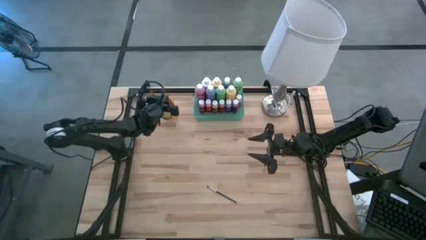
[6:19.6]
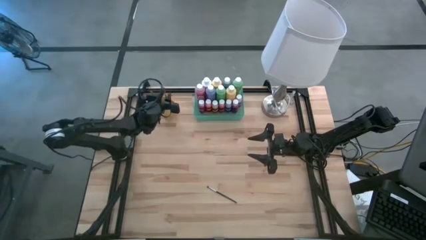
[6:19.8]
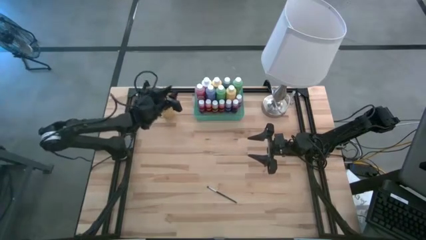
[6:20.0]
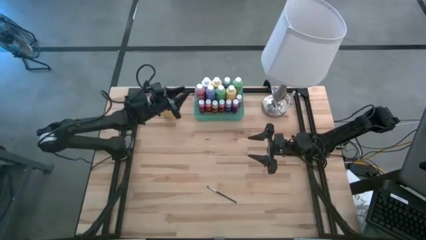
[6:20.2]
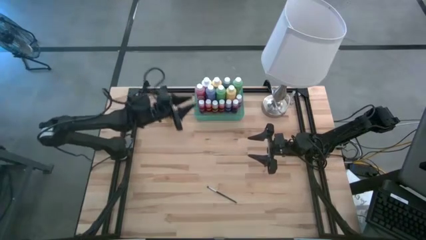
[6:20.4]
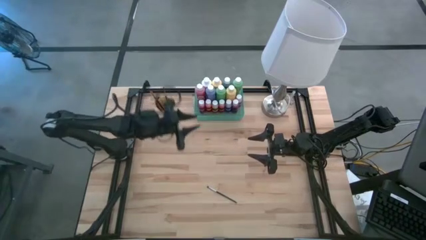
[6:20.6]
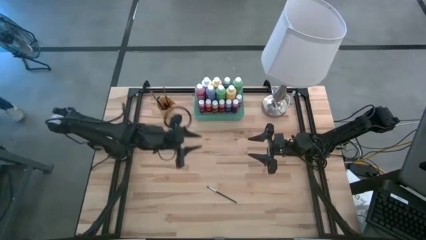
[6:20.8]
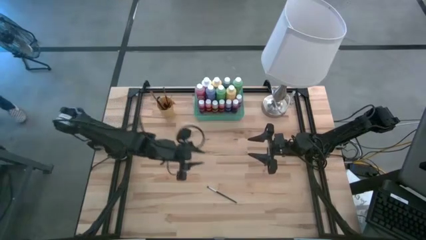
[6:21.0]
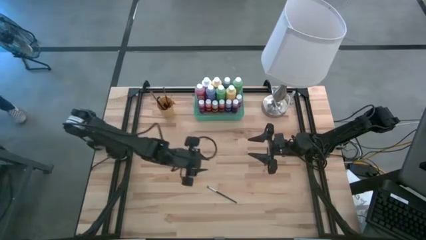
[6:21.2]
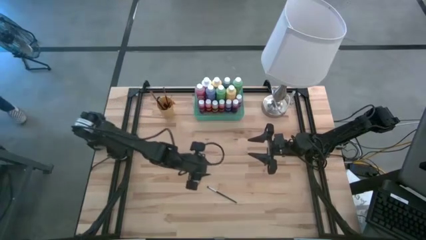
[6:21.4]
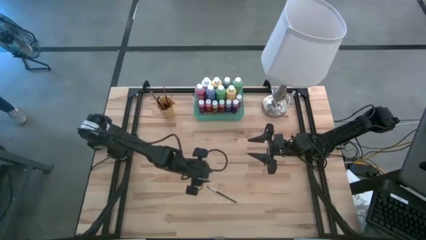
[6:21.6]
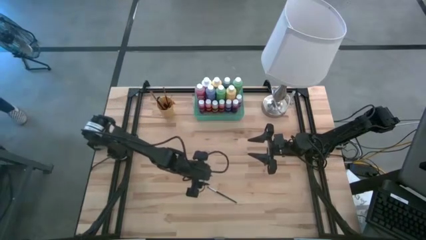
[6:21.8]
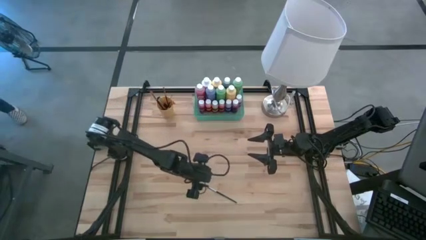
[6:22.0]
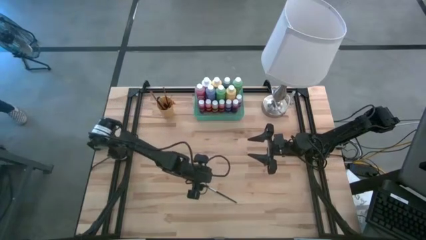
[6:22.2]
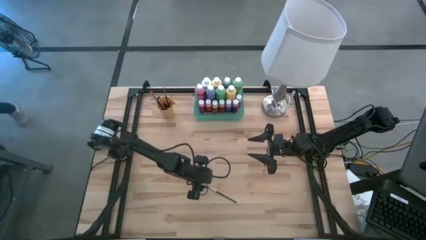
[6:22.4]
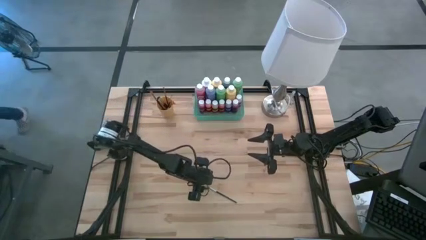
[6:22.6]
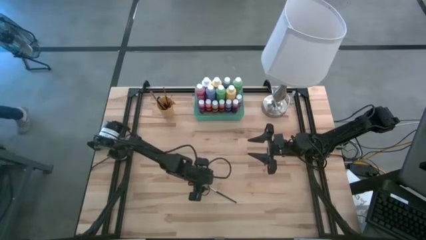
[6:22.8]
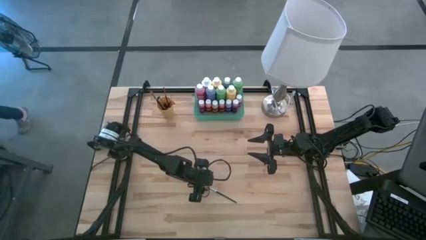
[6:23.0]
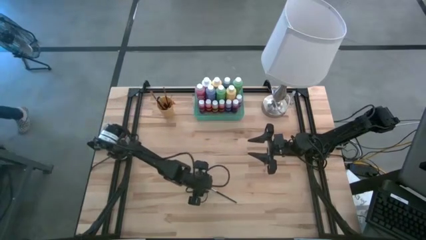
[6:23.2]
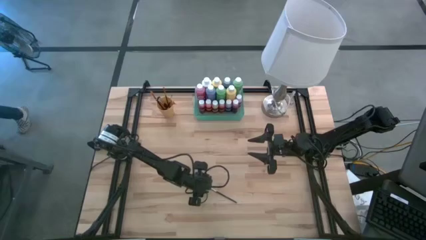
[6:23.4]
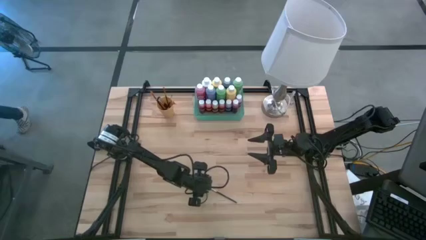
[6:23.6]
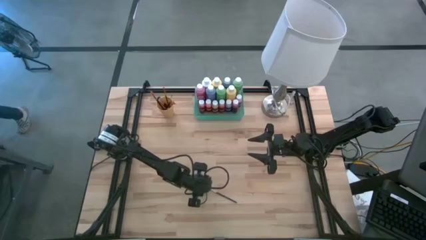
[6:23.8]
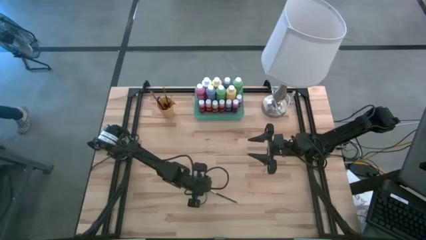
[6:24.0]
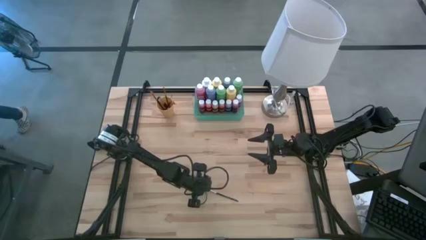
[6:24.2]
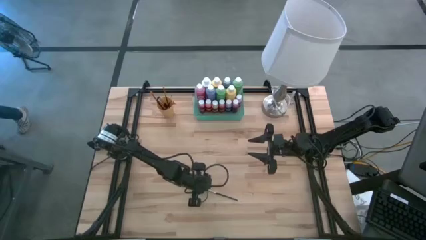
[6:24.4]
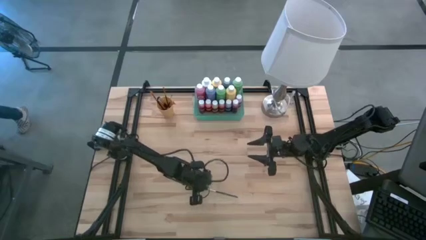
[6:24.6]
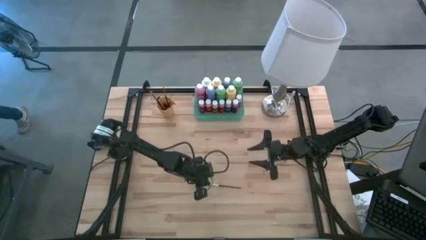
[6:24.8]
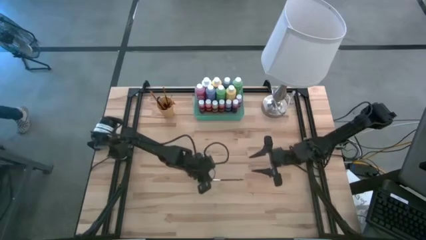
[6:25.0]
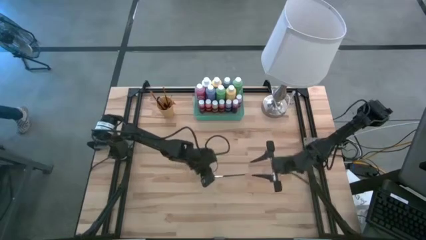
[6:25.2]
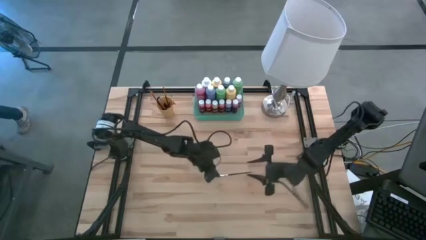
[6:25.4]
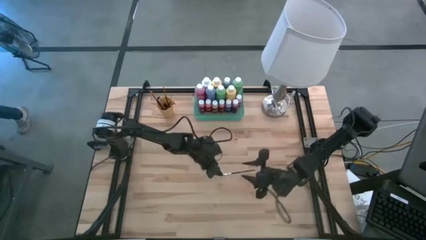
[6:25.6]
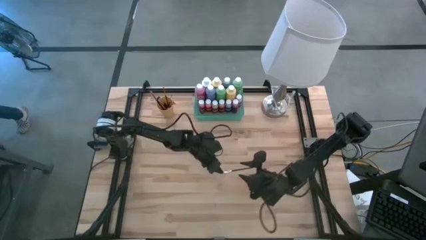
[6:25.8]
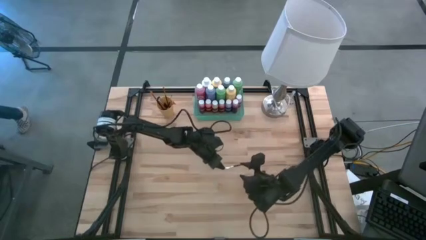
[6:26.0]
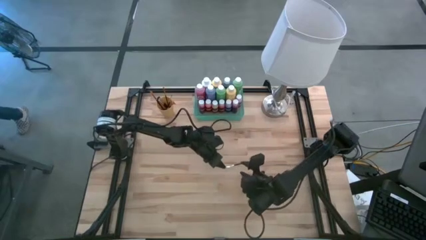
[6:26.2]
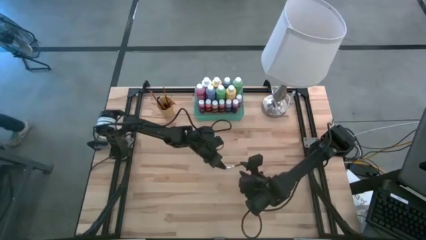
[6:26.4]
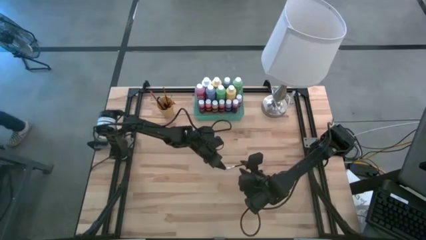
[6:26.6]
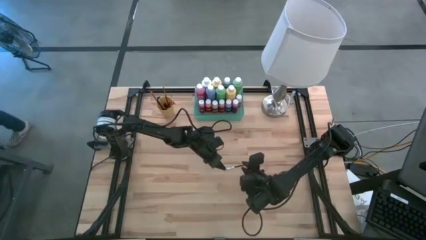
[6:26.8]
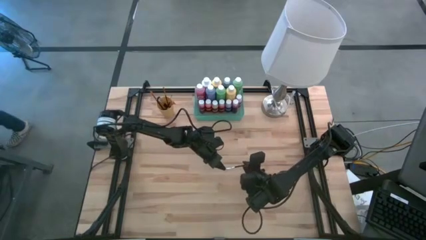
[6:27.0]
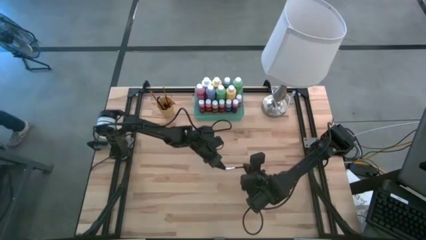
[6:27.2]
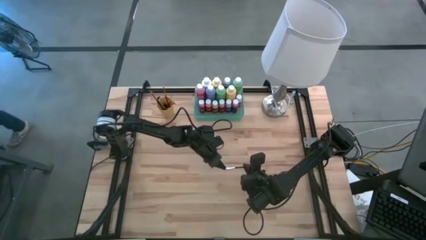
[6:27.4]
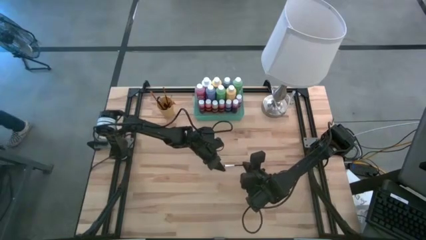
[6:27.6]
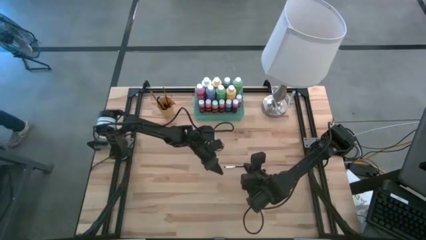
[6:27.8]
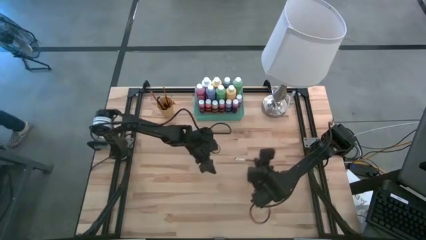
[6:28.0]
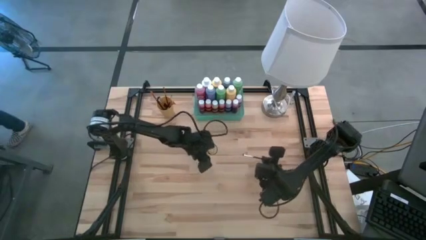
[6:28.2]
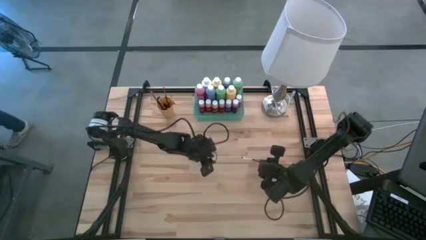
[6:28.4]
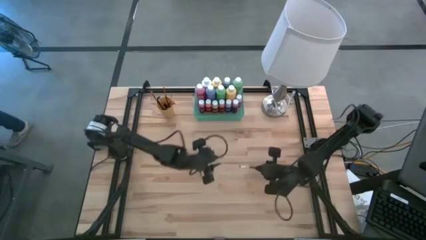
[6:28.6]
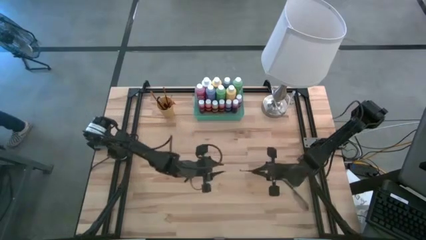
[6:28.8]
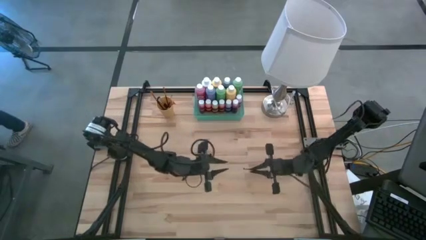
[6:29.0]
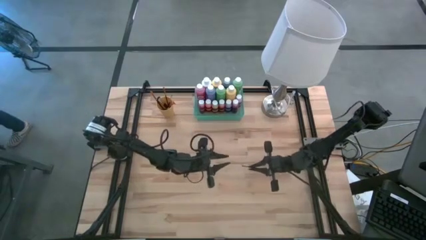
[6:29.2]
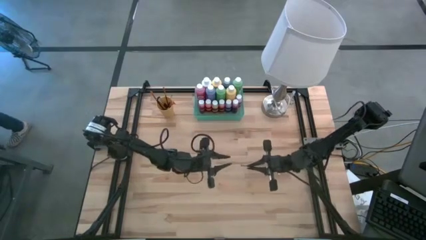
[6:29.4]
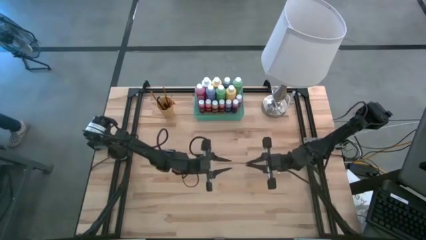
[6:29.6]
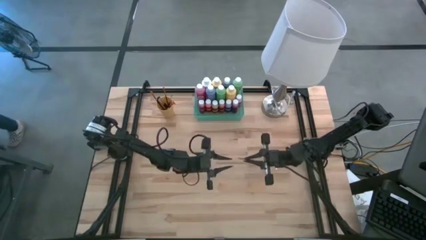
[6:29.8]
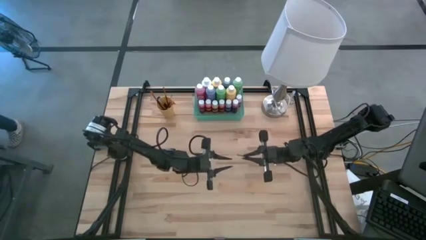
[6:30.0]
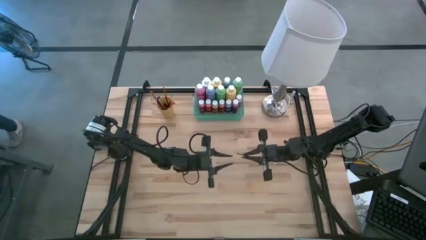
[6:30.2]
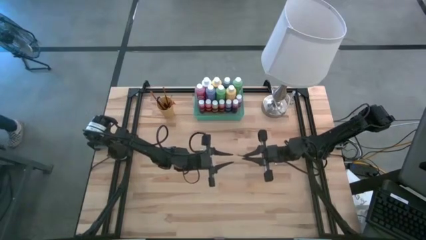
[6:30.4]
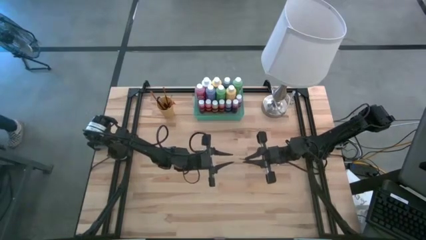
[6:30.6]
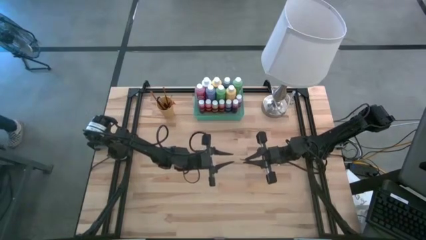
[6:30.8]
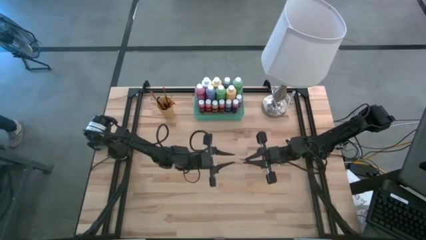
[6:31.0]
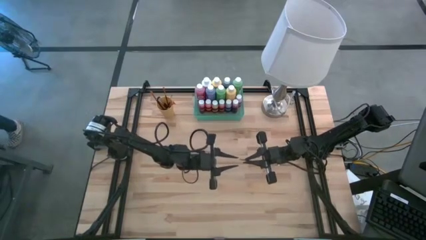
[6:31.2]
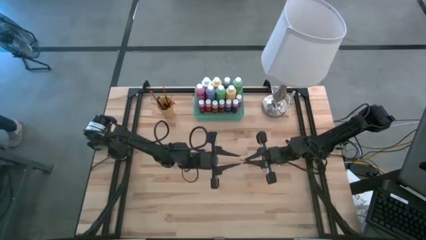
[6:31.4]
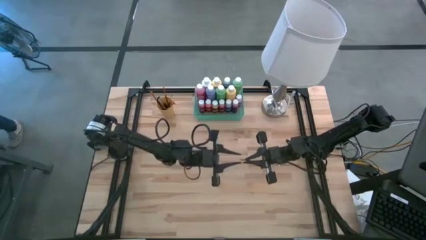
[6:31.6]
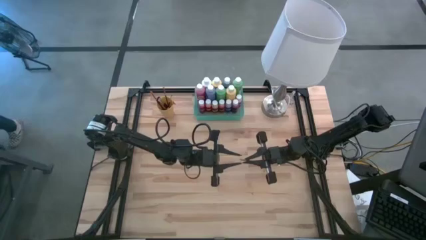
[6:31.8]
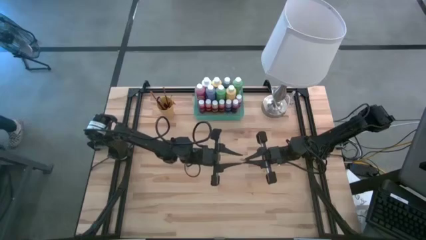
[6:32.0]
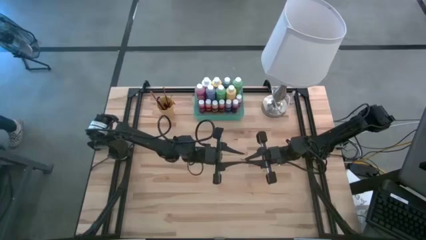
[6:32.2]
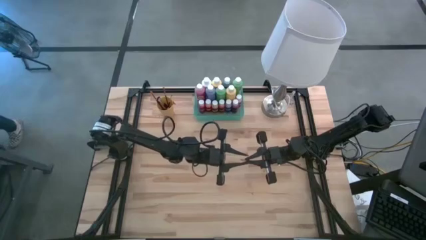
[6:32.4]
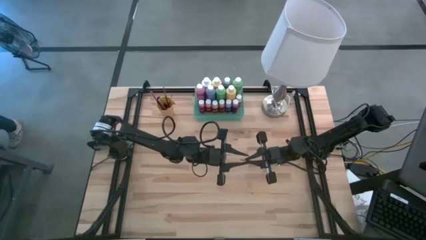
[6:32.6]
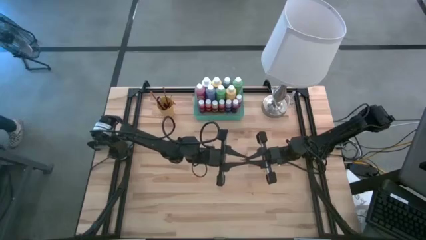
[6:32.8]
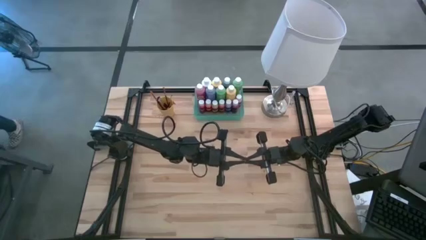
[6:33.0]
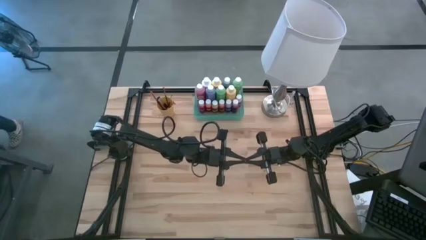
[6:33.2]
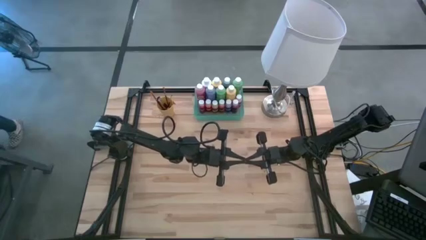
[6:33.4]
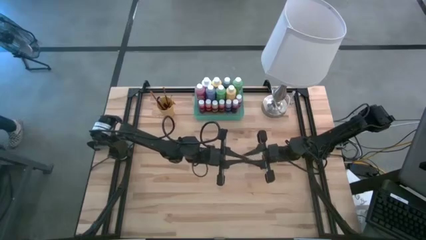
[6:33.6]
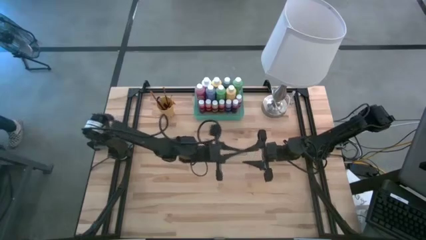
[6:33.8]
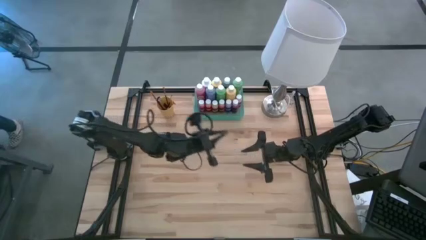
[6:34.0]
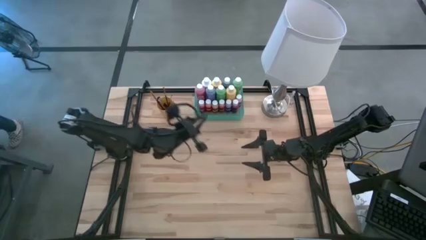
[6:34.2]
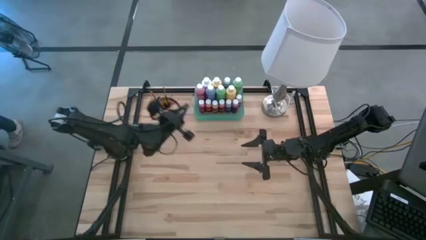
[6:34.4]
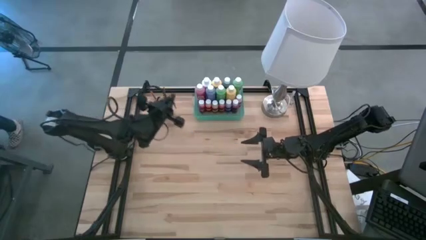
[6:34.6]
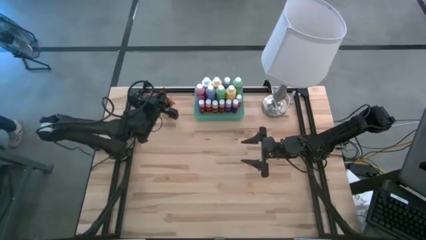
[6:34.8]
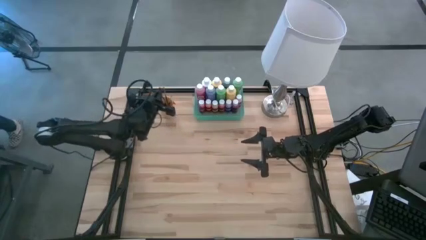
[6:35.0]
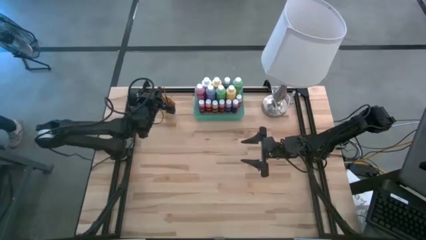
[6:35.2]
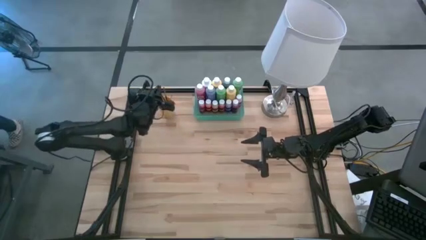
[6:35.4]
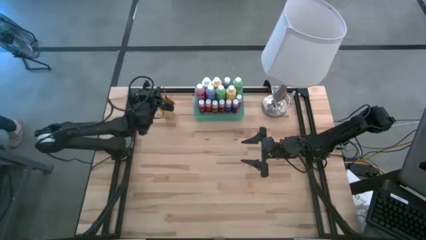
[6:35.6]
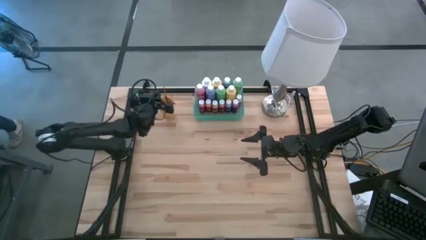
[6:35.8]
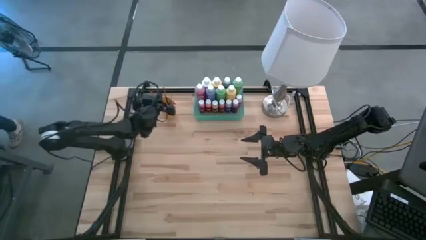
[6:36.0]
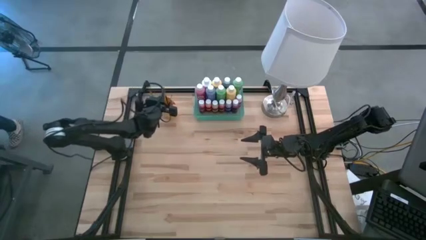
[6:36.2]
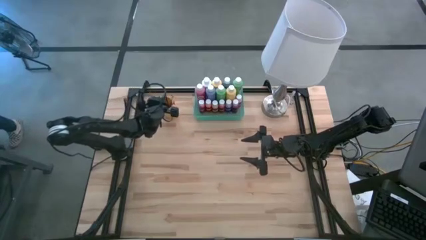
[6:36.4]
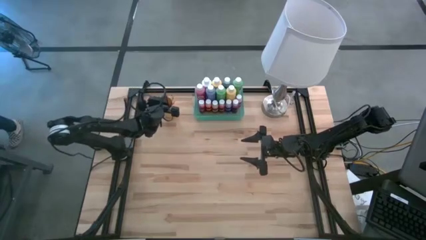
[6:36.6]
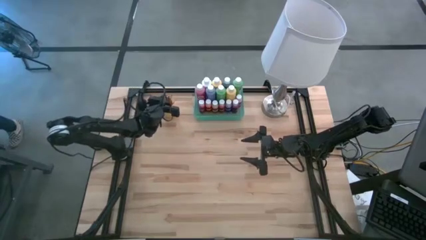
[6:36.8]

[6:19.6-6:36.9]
Task: Pick & Place Paint Supplies
Put the silver paintbrush into the orange cup
